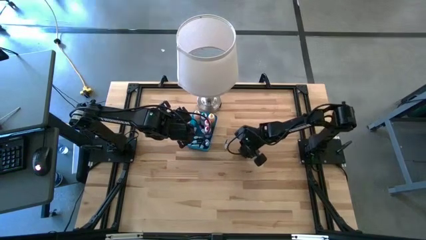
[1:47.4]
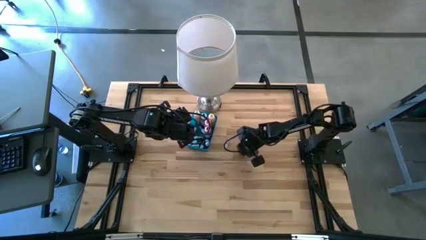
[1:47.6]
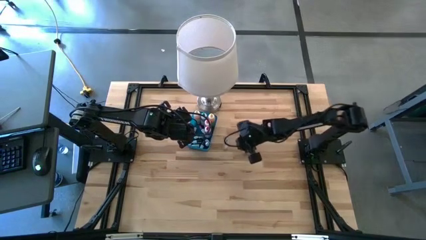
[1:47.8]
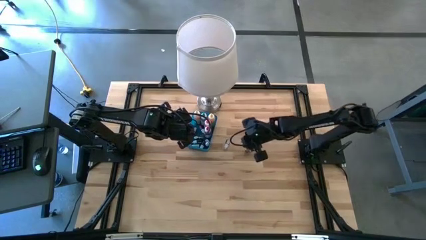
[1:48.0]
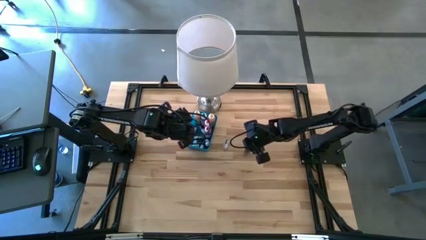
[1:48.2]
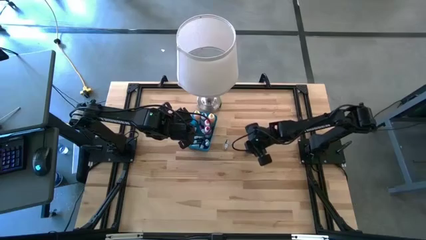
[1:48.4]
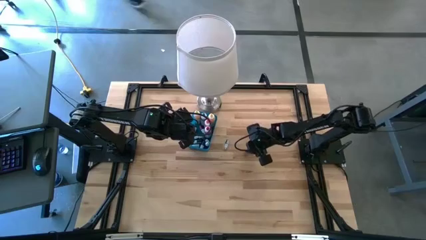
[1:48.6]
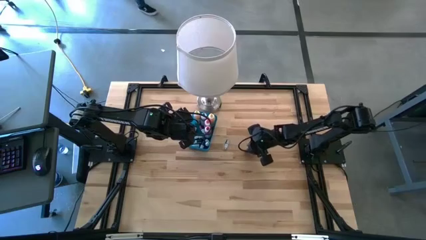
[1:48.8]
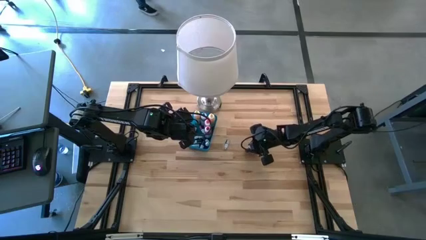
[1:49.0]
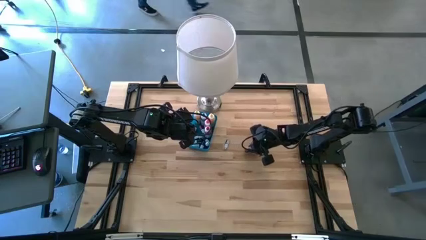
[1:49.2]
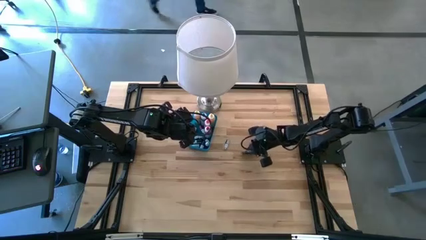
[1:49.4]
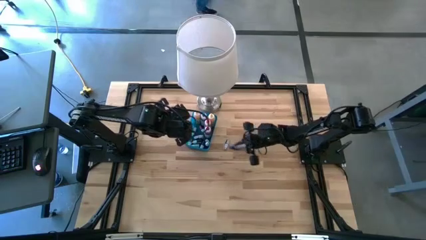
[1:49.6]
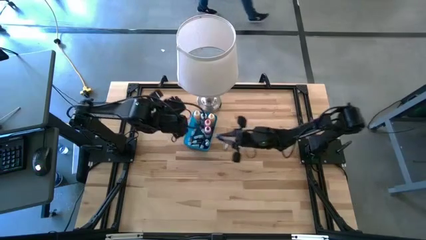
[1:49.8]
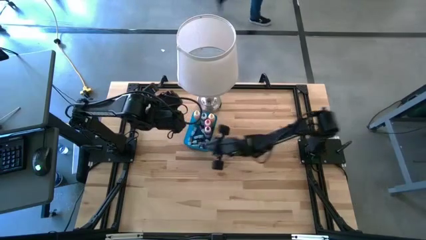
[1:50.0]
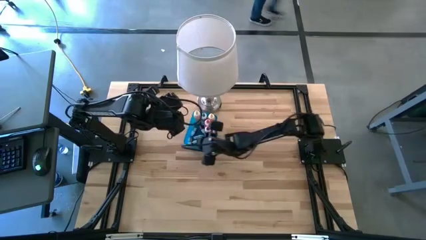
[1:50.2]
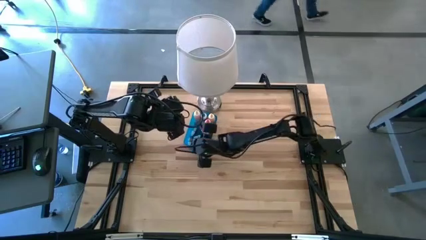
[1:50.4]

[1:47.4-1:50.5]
Task: Pick & Place food coloring
Put the small red food coloring bottle into the blue bin

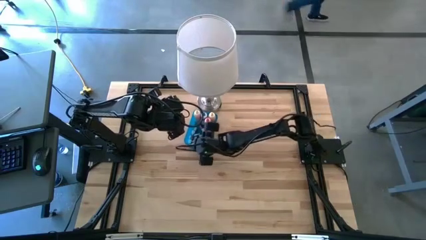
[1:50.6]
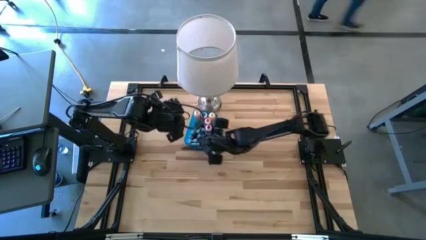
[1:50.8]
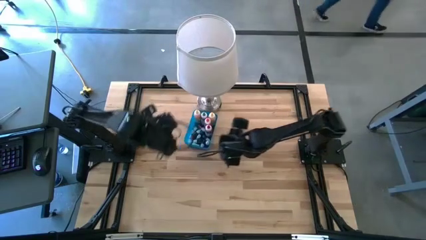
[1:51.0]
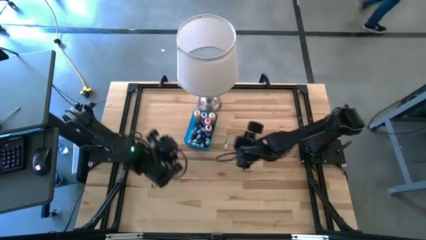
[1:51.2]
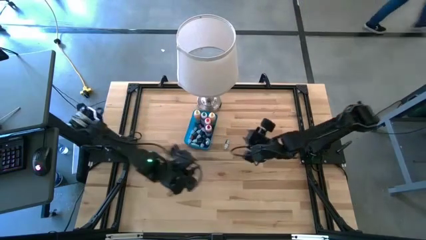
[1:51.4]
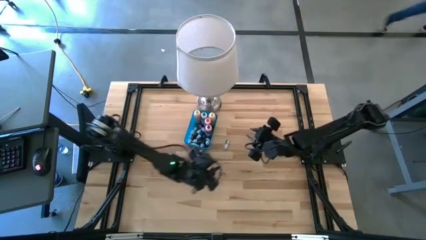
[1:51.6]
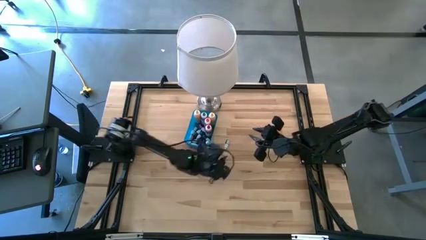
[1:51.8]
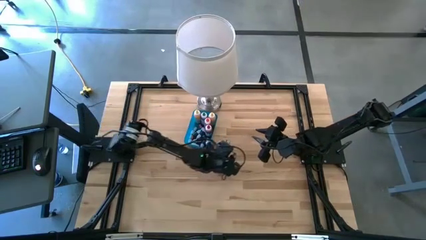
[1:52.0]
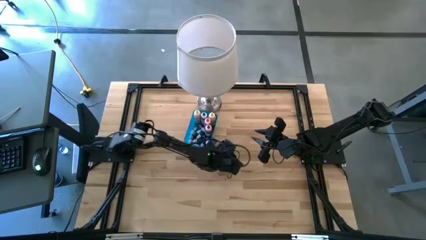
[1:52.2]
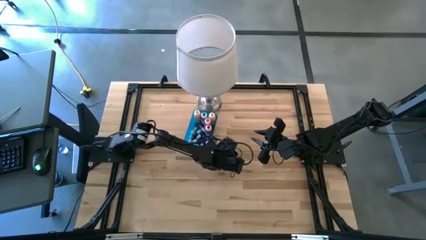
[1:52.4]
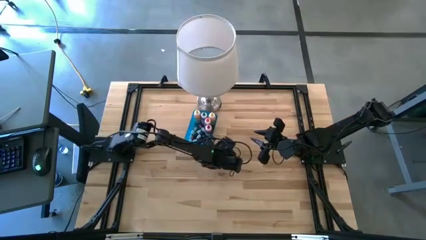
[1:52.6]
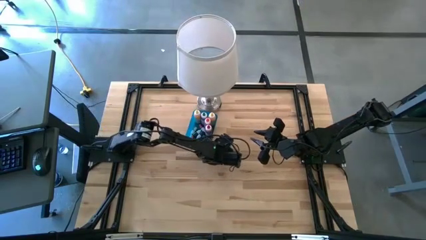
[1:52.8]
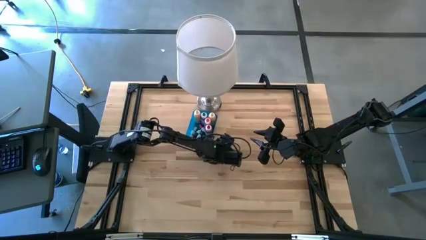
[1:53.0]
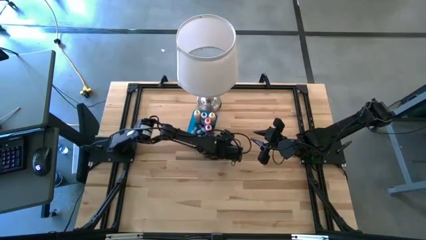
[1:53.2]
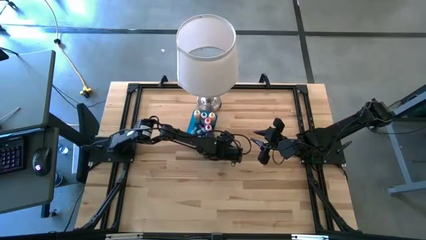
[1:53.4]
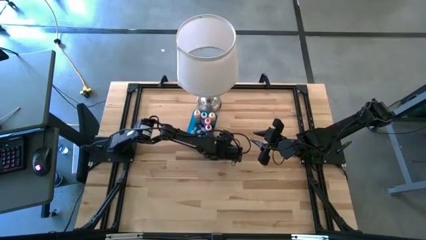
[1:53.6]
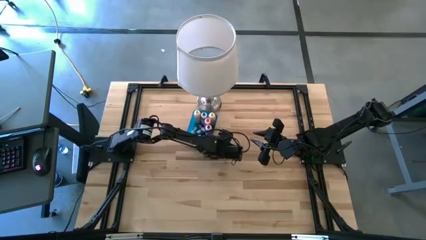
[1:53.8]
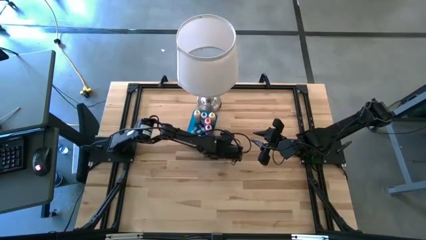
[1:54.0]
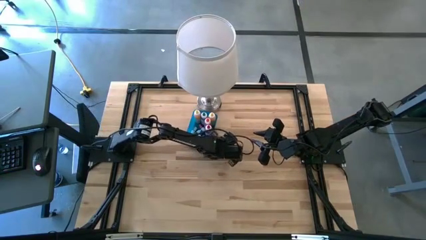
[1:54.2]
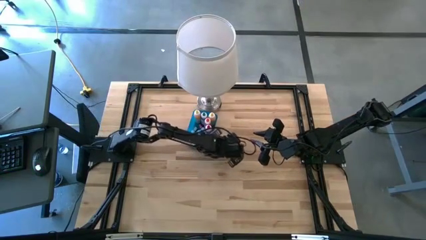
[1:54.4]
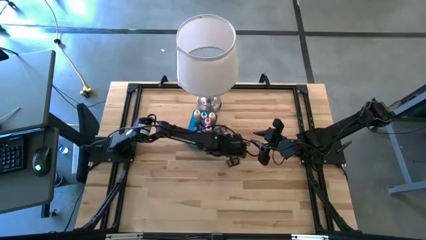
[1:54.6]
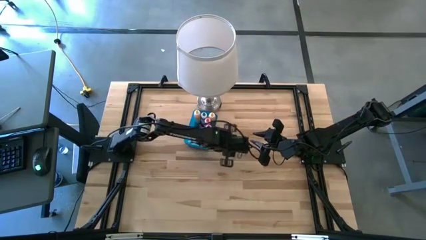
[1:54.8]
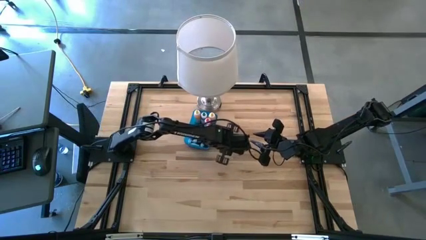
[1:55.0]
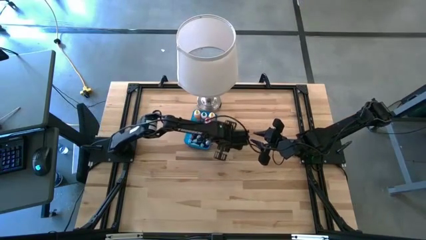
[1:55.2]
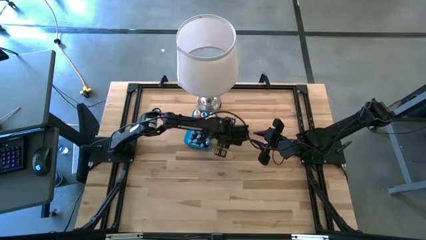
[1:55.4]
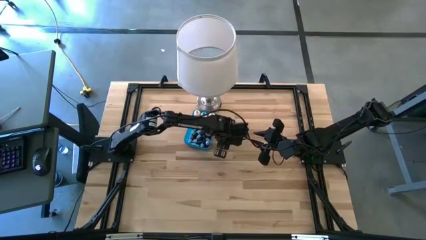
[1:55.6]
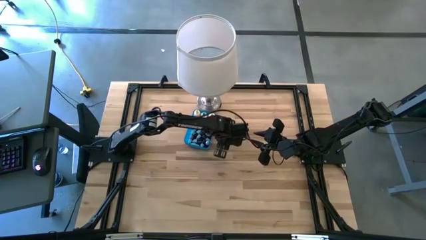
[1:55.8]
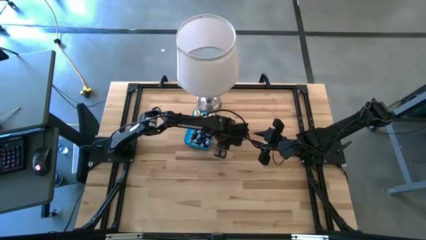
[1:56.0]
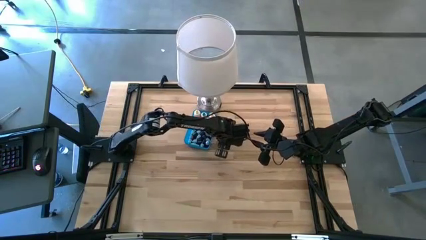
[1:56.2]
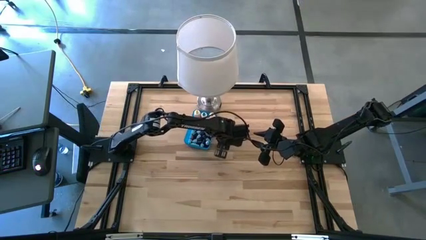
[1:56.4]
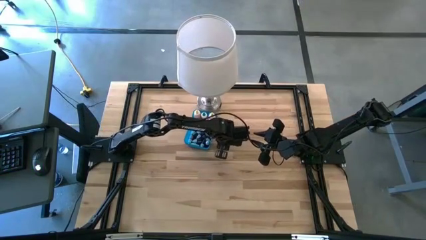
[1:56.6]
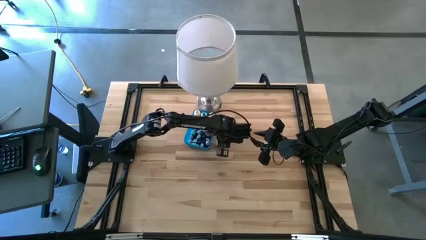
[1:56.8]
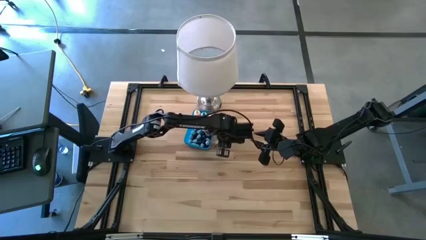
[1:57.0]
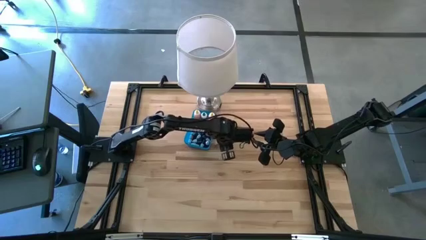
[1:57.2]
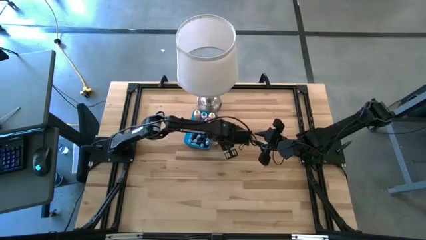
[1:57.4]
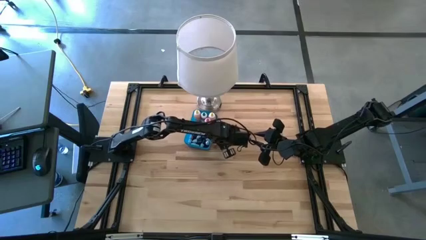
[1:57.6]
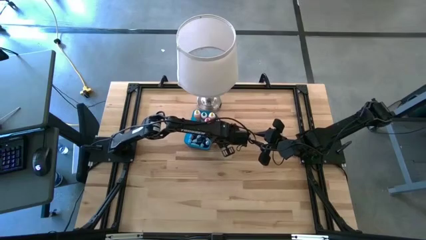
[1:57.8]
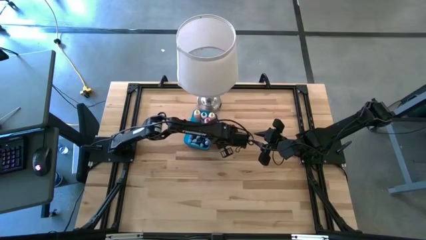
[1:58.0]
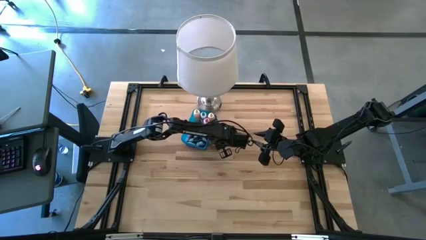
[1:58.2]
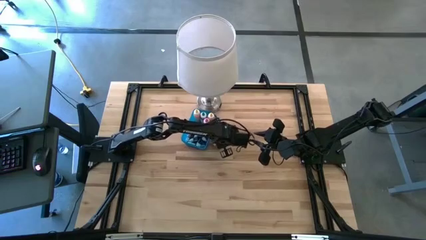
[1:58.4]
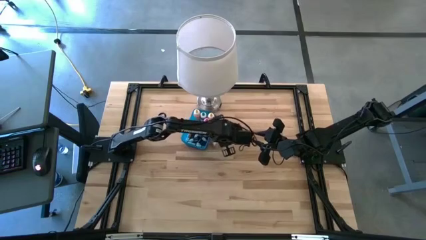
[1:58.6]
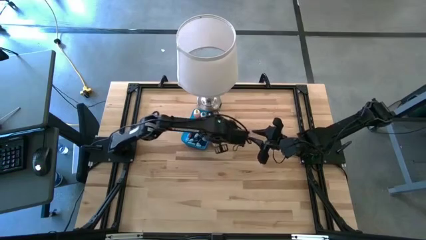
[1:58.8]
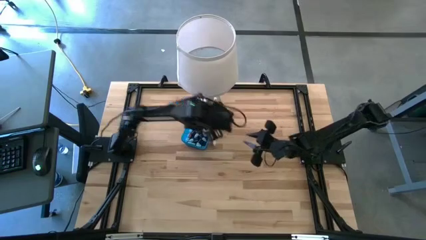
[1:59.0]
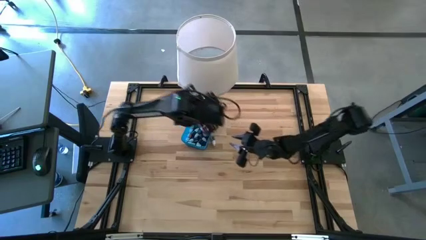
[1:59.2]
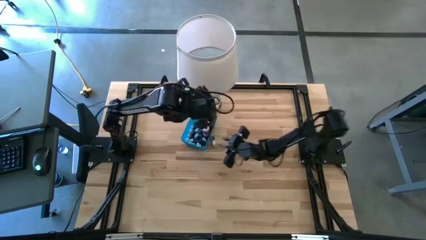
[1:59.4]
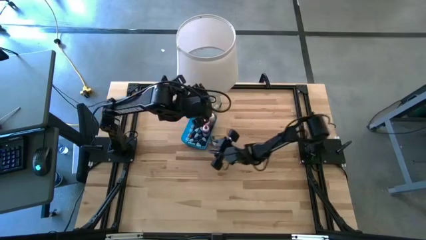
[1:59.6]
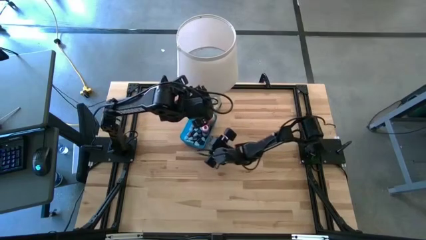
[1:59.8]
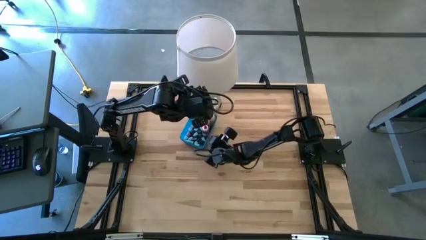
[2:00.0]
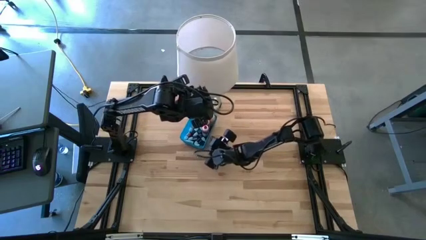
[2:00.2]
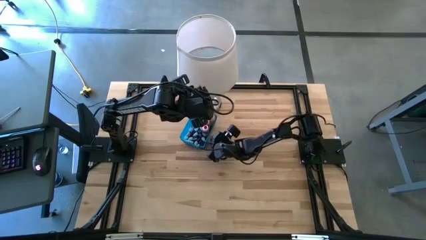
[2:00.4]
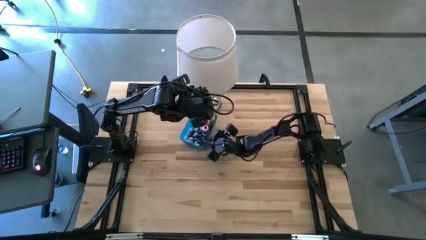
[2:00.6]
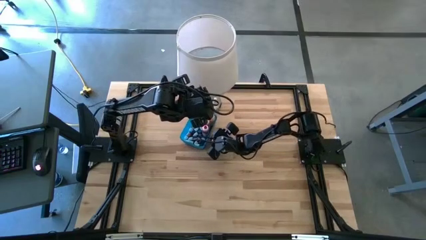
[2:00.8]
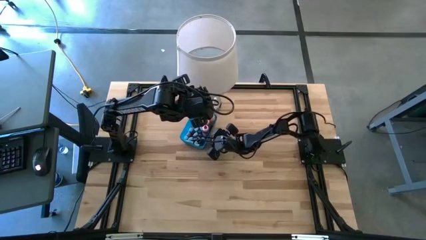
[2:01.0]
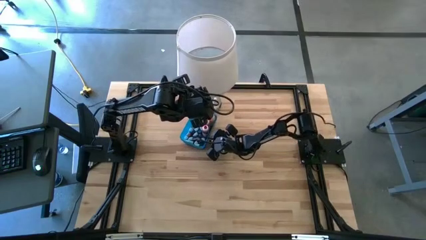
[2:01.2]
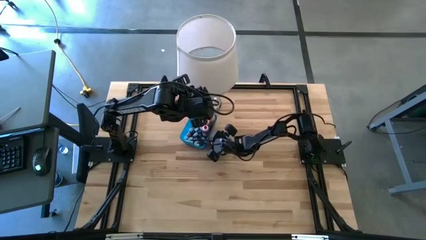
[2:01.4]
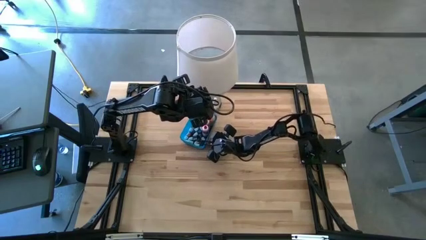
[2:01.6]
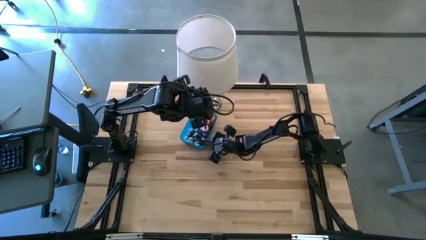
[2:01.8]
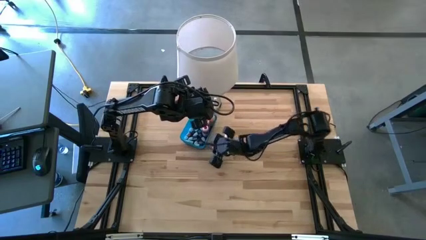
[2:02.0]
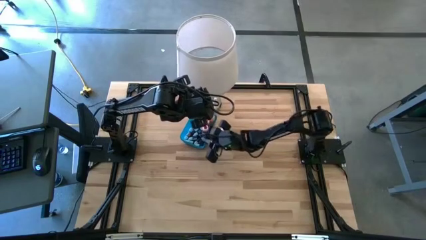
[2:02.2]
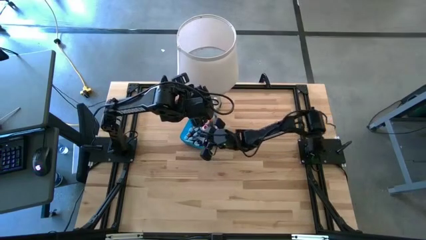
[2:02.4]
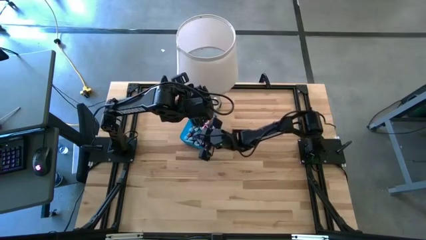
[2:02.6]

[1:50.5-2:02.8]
Put the small black food coloring bottle into the blue bin
